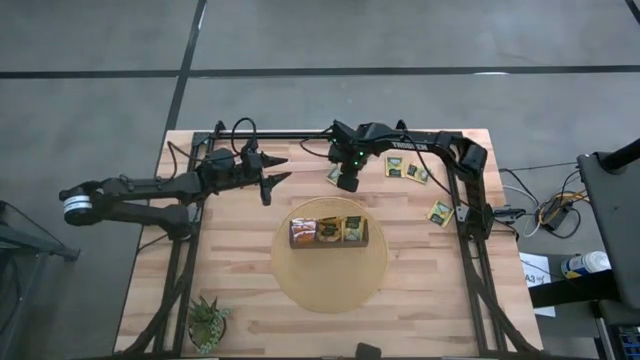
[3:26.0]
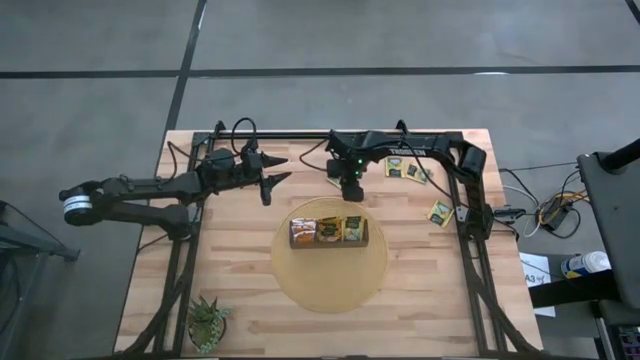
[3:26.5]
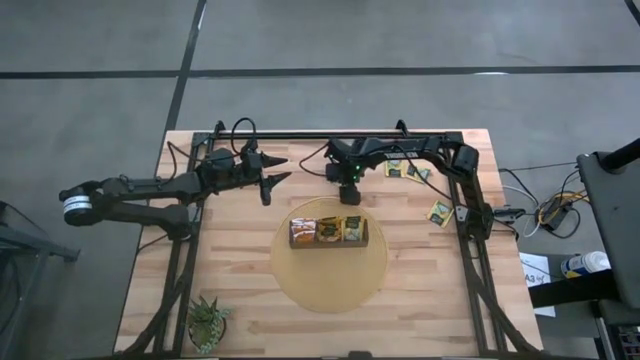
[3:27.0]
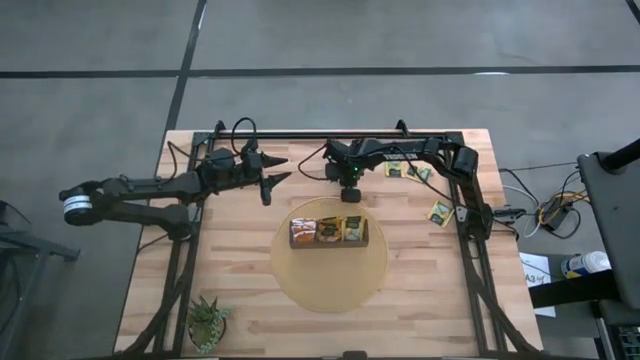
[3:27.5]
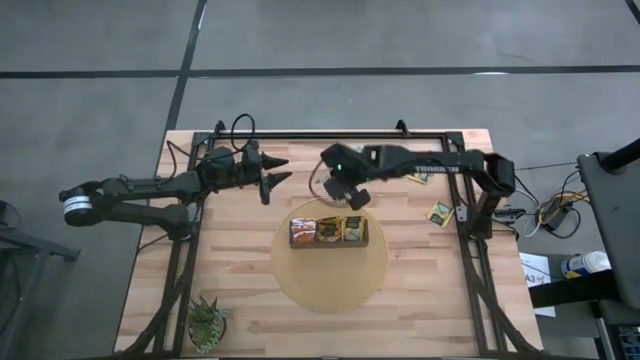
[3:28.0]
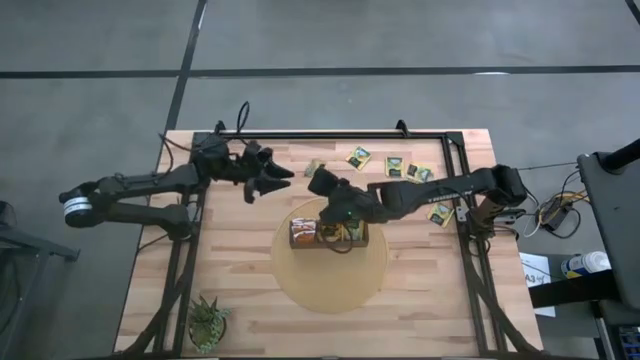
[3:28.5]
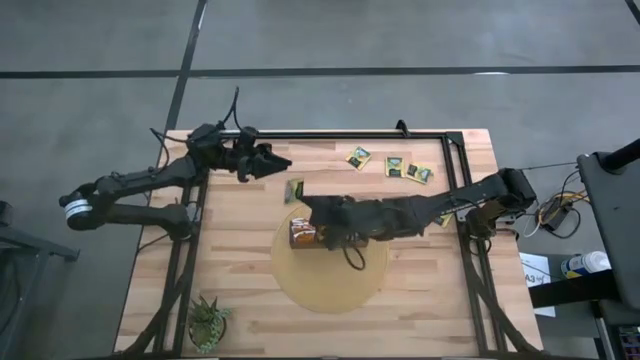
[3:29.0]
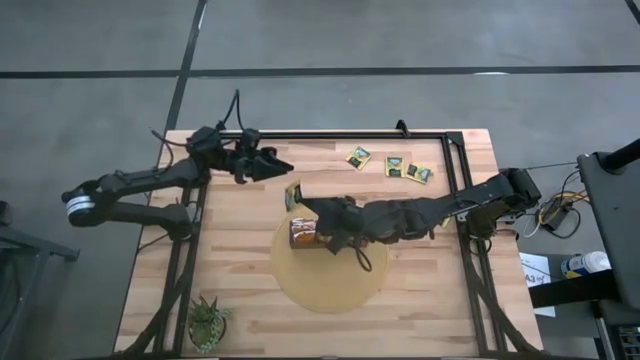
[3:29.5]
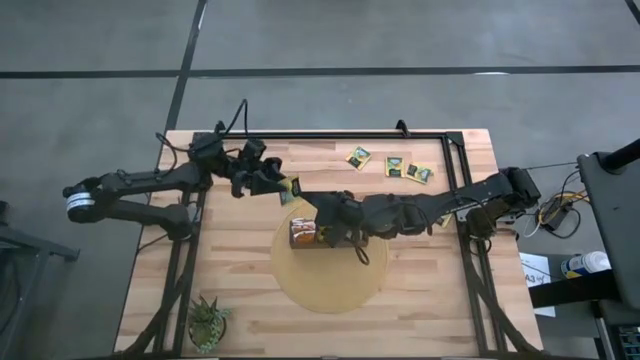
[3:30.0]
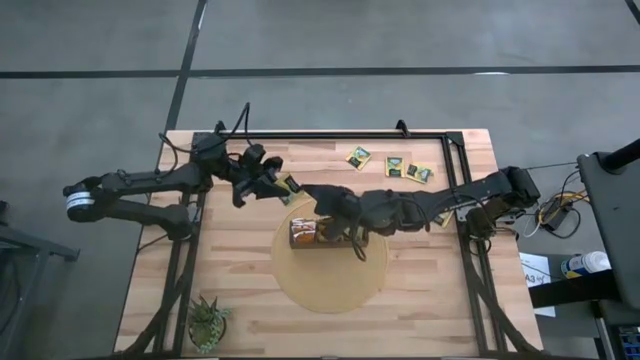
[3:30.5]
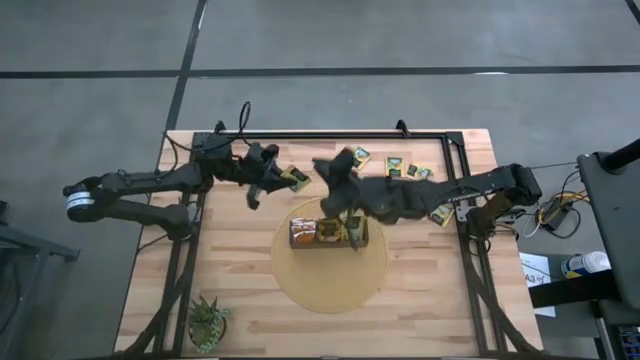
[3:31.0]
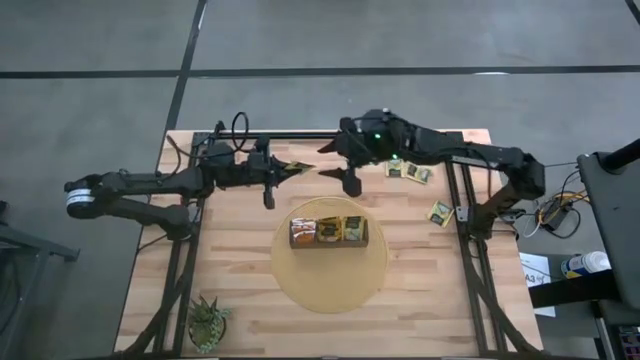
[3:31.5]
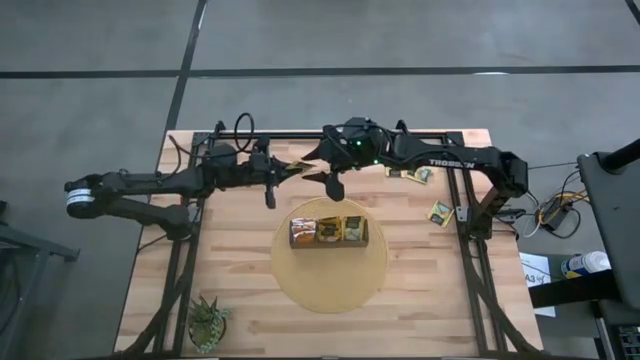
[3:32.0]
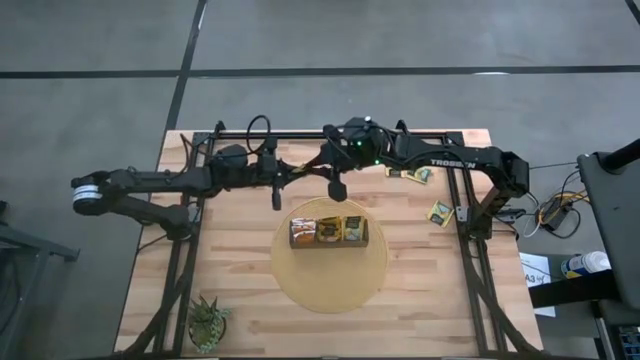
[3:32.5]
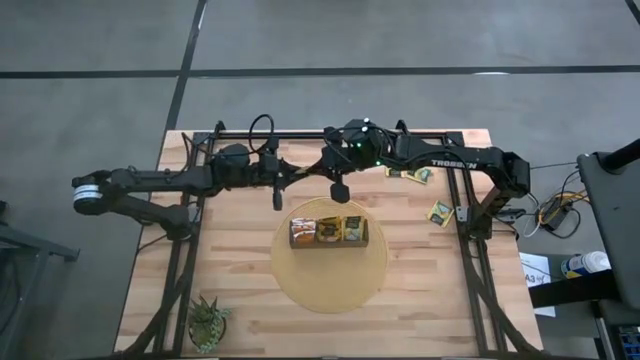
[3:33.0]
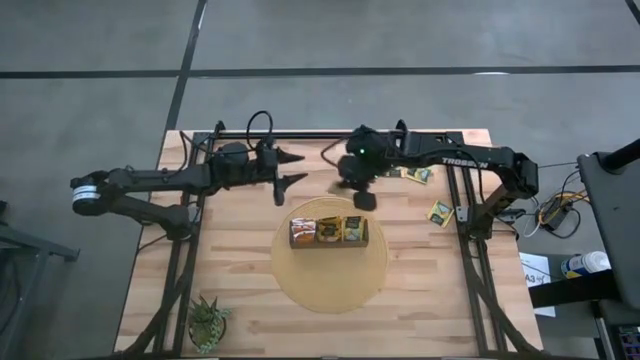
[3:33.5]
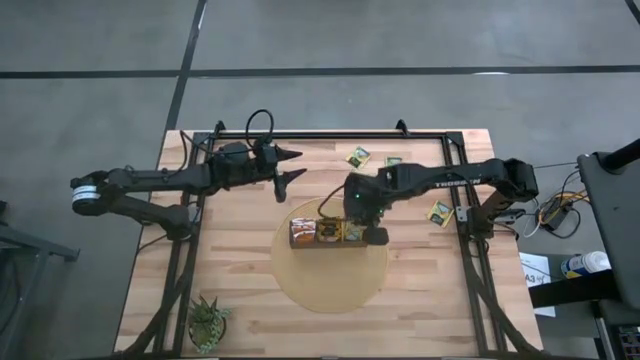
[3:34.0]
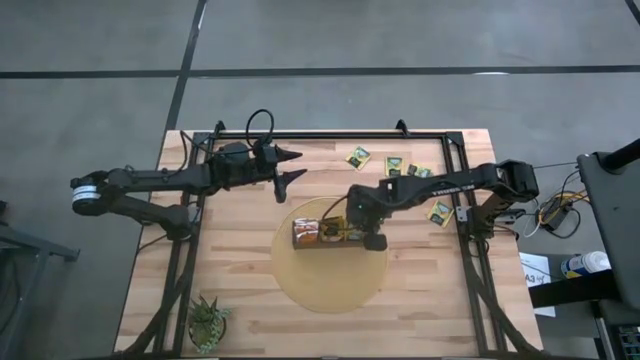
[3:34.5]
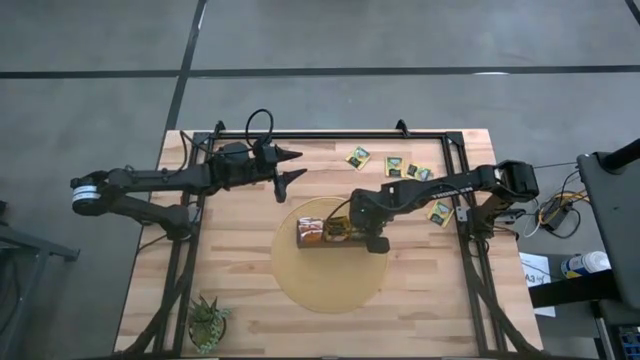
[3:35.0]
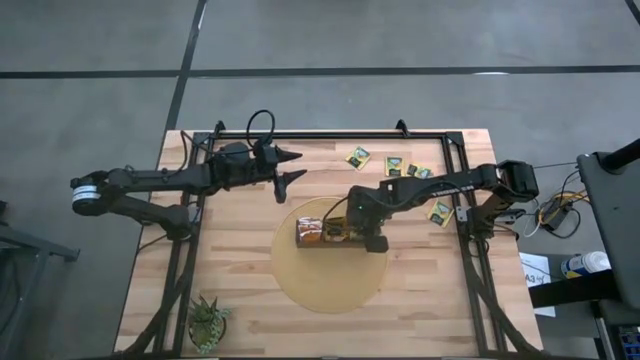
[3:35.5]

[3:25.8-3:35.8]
Task: Pick & Place Tea
Put the yellow tea bag into the right section of the wooden organizer

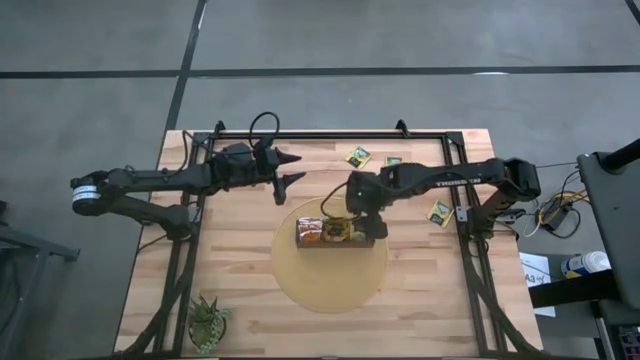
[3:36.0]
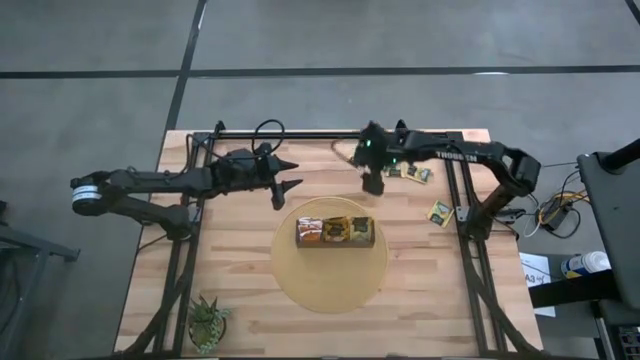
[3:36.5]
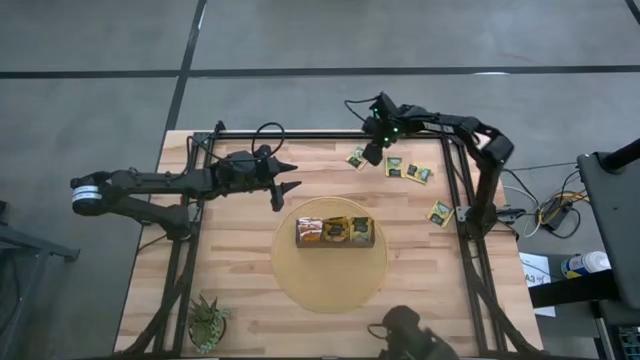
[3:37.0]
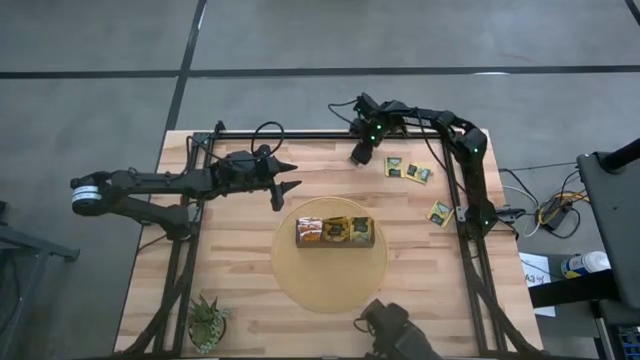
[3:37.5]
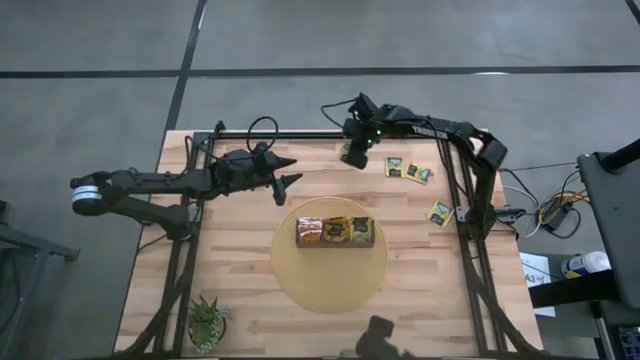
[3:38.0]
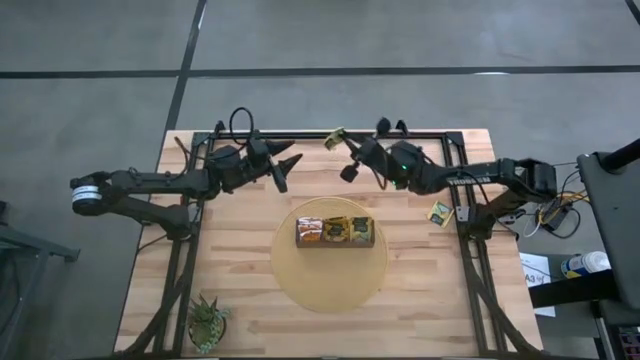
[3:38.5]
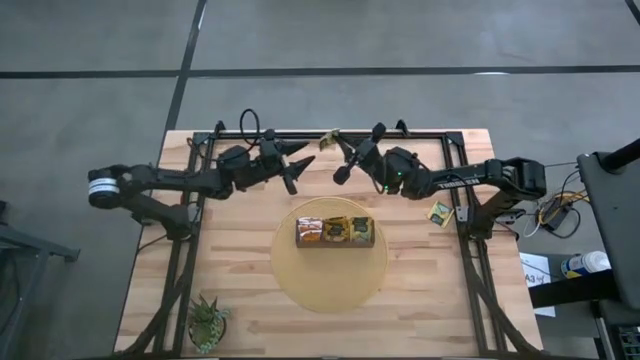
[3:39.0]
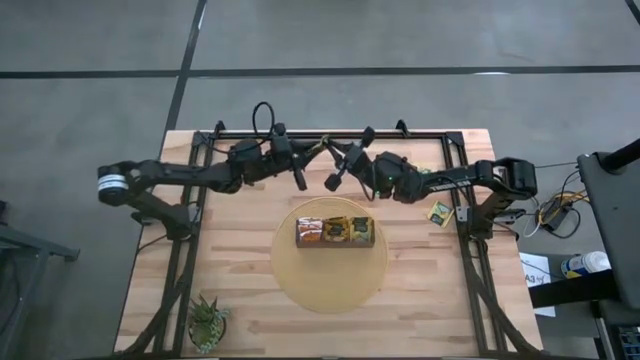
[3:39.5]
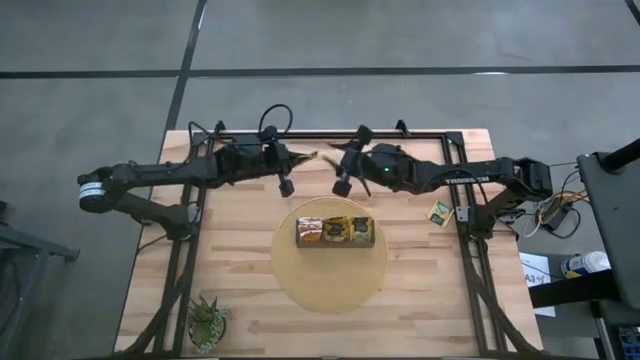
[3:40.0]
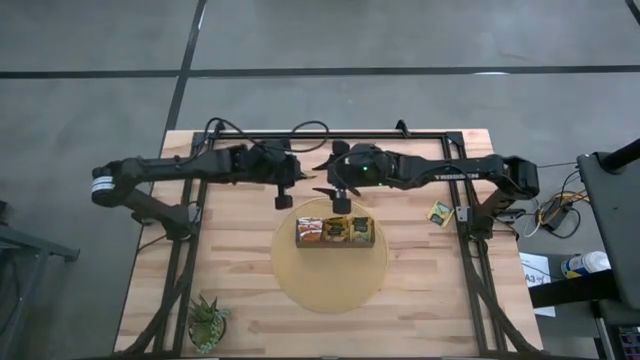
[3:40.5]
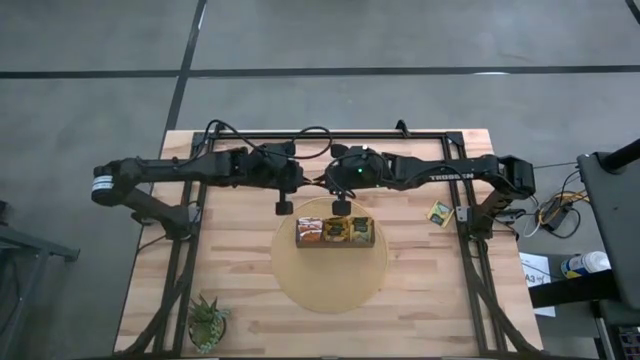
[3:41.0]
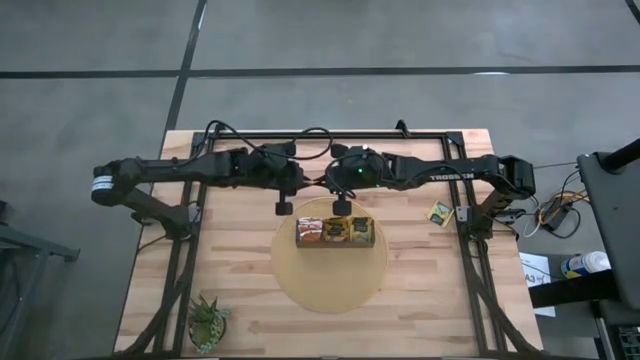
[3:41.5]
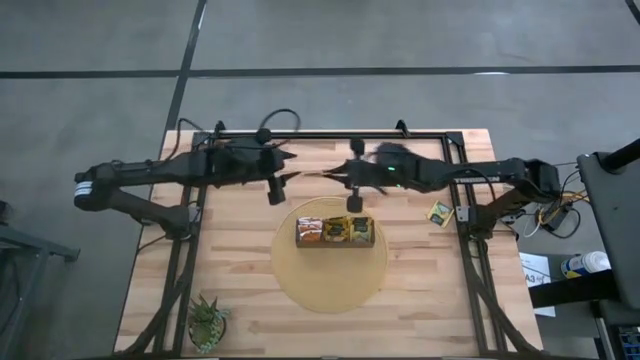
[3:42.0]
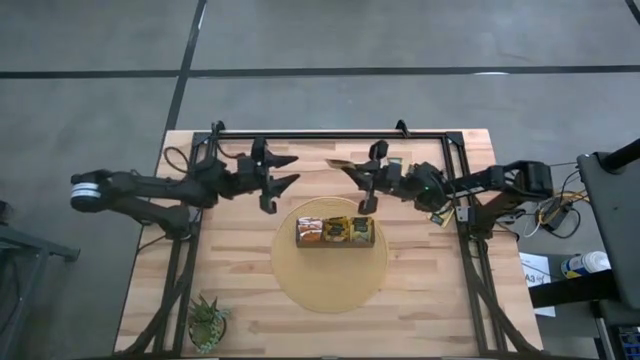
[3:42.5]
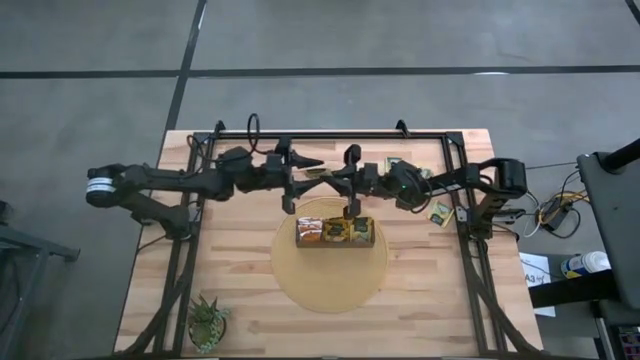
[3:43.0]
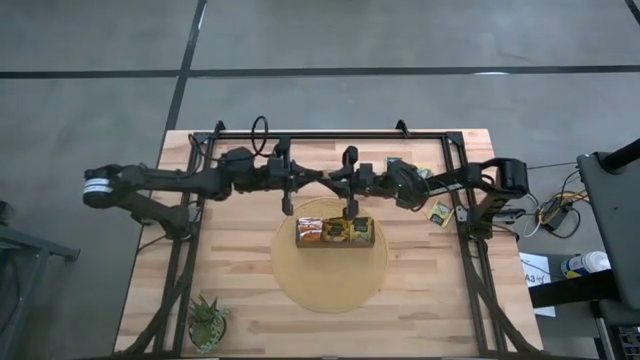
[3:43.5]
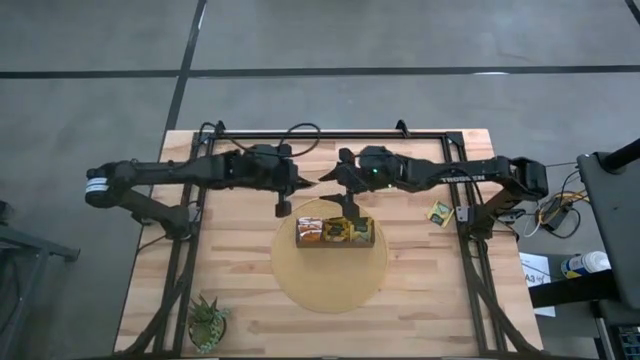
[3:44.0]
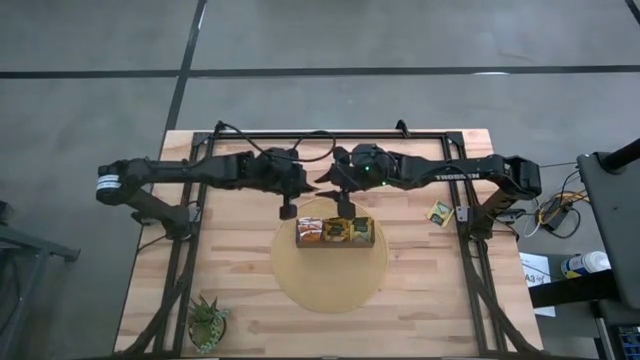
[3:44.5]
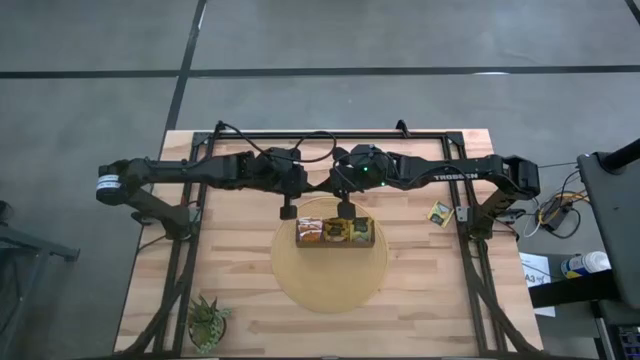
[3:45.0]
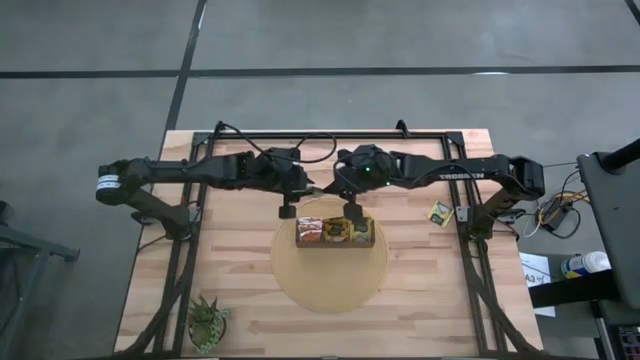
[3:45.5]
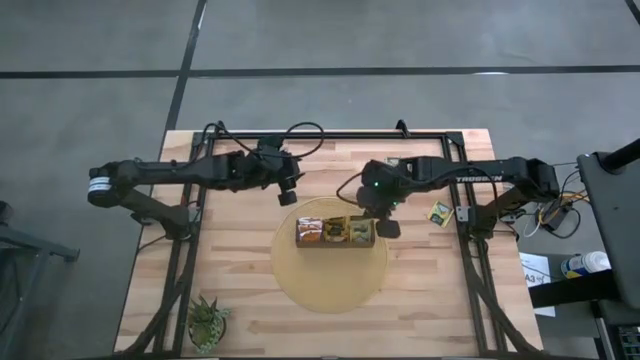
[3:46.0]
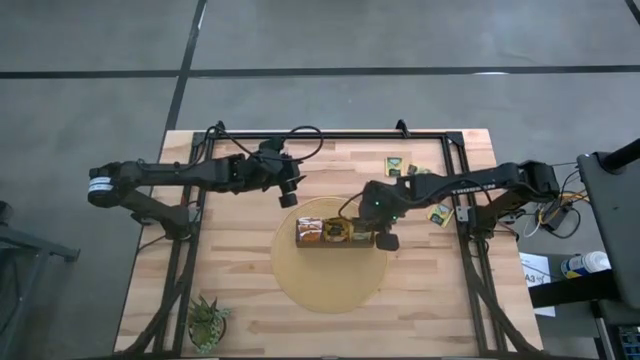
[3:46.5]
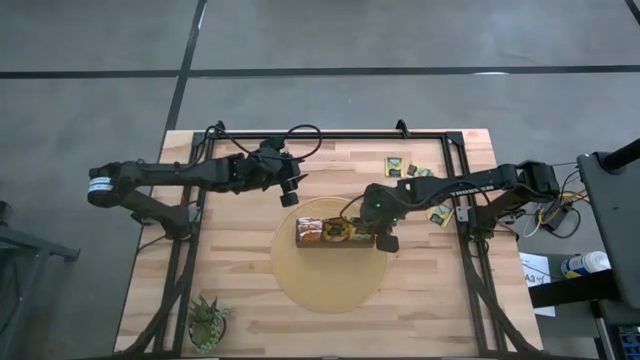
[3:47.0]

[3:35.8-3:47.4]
Put the yellow tea bag into the right section of the wooden organizer
